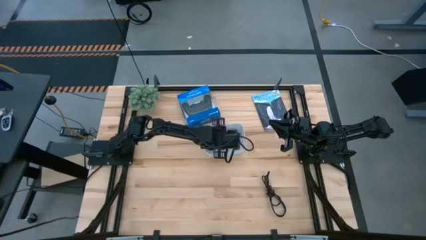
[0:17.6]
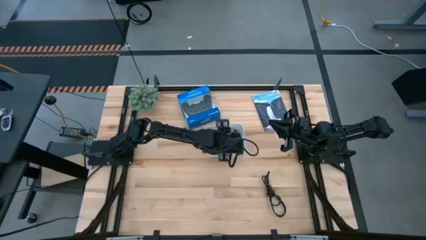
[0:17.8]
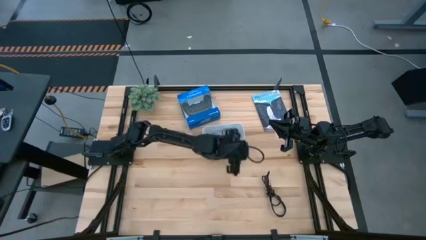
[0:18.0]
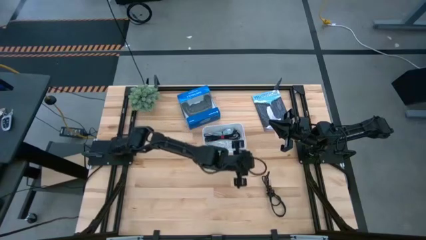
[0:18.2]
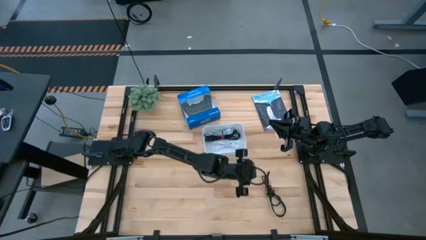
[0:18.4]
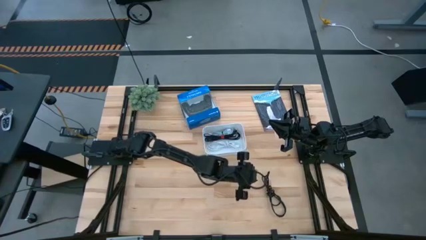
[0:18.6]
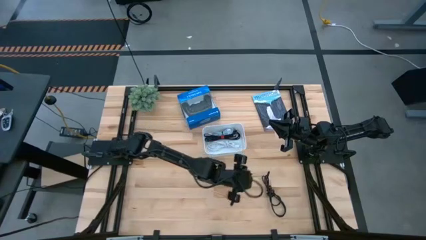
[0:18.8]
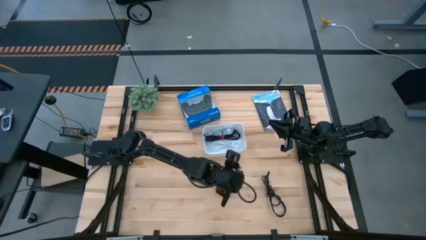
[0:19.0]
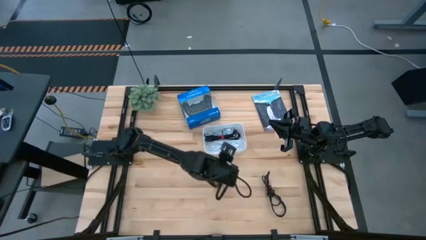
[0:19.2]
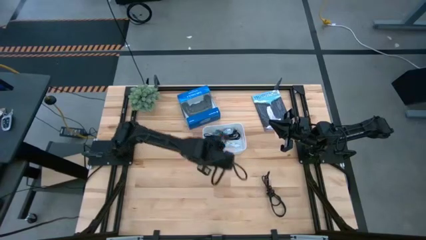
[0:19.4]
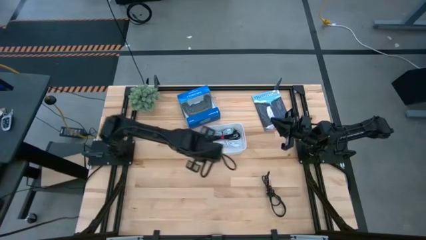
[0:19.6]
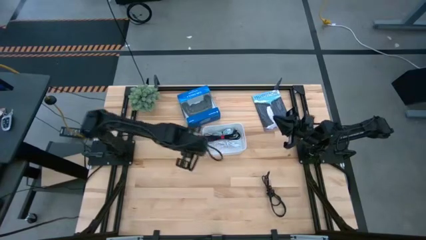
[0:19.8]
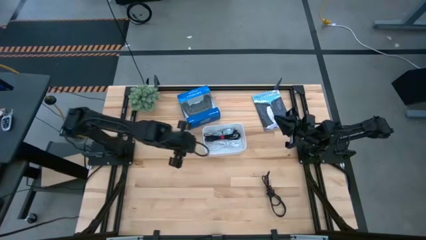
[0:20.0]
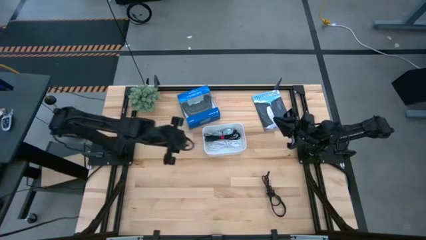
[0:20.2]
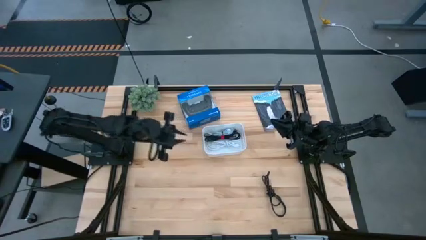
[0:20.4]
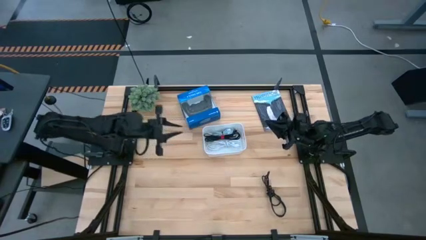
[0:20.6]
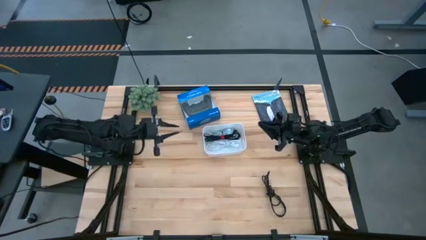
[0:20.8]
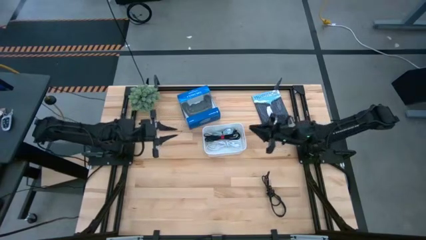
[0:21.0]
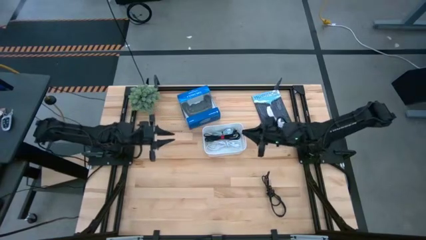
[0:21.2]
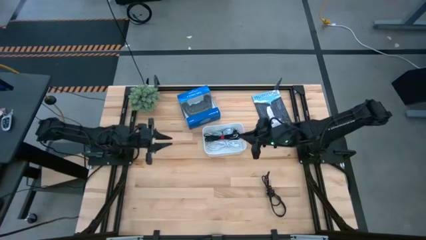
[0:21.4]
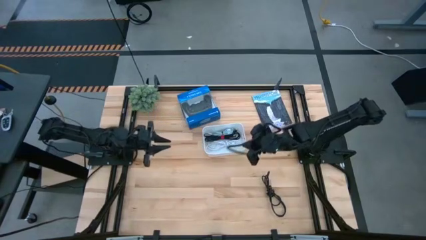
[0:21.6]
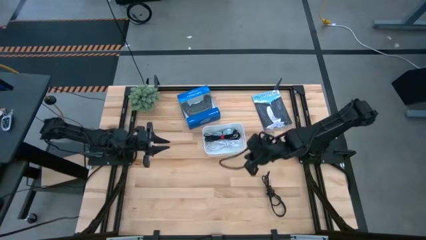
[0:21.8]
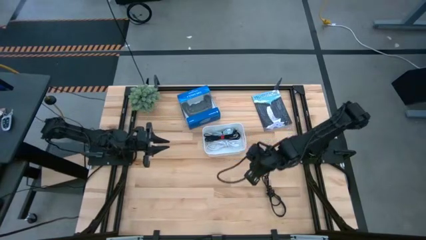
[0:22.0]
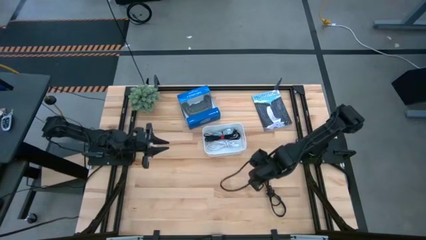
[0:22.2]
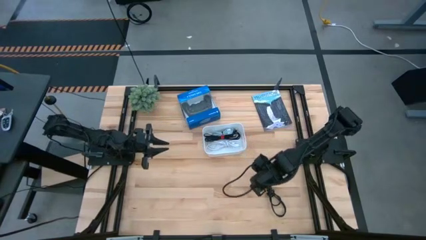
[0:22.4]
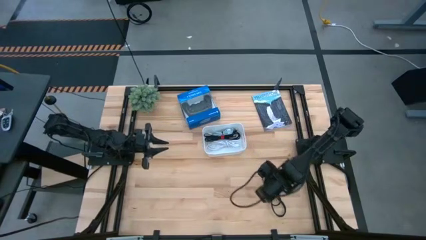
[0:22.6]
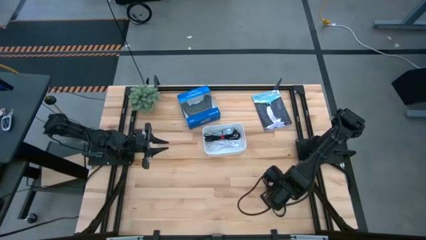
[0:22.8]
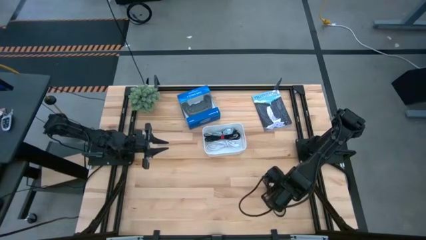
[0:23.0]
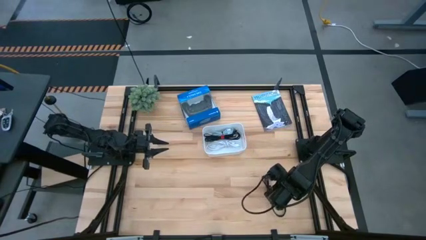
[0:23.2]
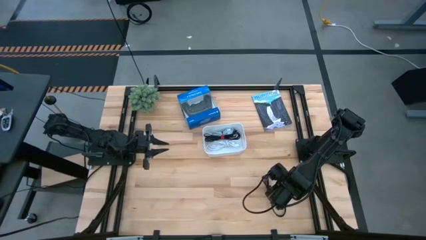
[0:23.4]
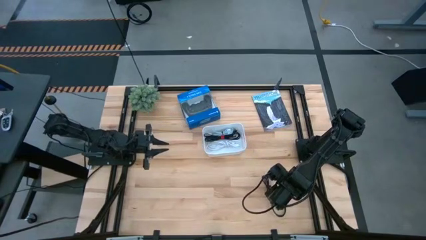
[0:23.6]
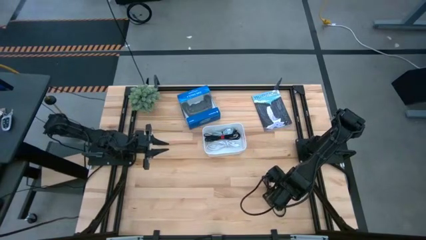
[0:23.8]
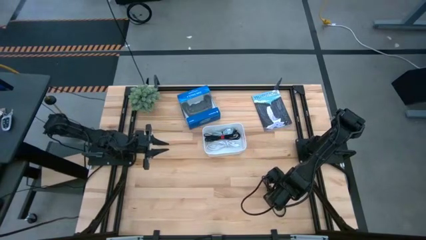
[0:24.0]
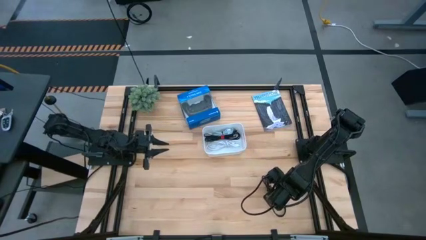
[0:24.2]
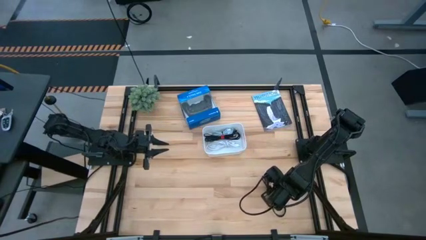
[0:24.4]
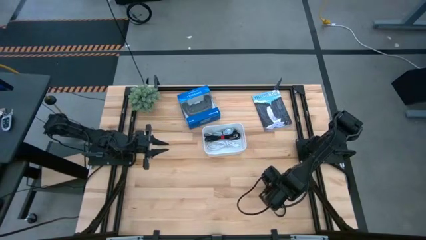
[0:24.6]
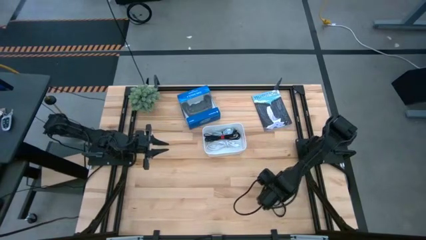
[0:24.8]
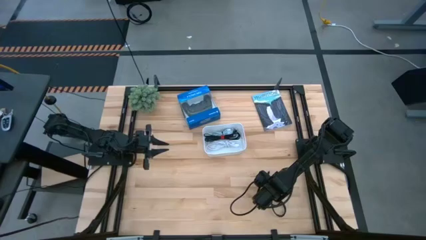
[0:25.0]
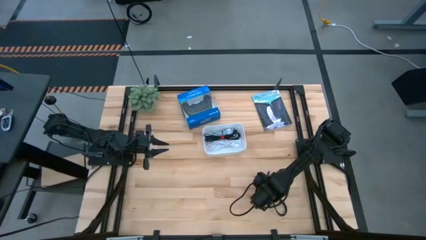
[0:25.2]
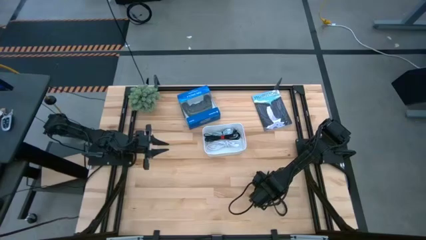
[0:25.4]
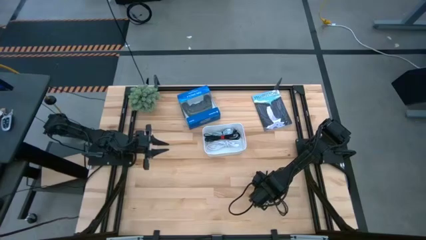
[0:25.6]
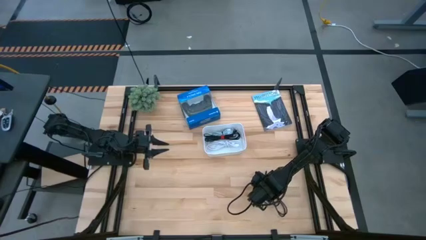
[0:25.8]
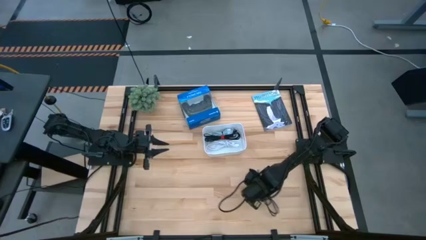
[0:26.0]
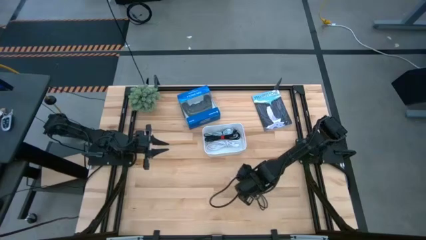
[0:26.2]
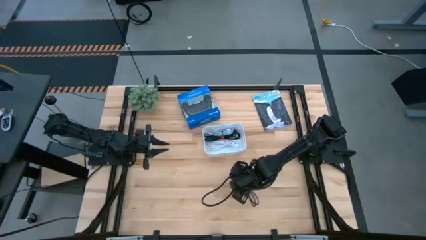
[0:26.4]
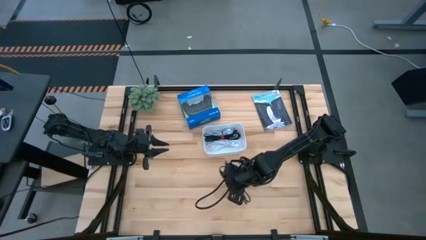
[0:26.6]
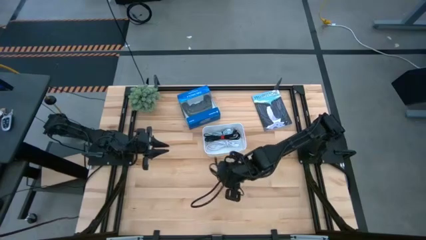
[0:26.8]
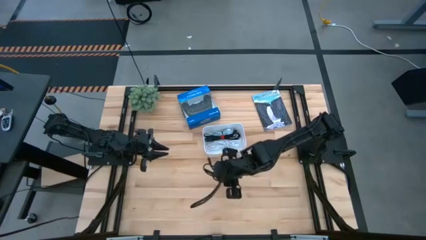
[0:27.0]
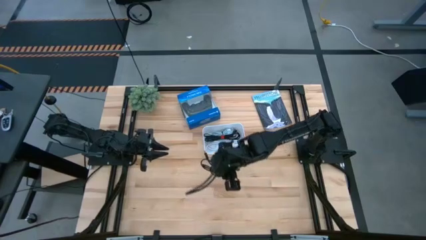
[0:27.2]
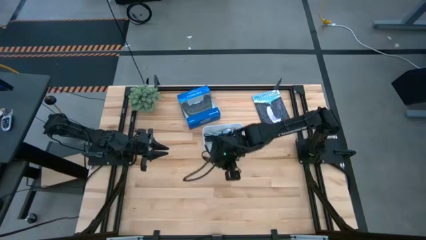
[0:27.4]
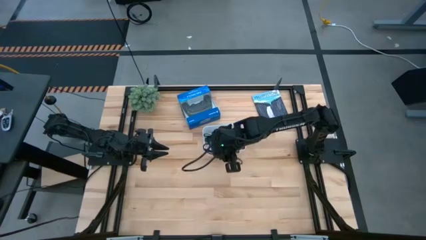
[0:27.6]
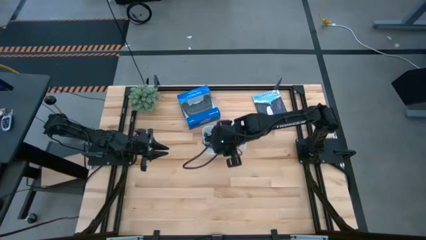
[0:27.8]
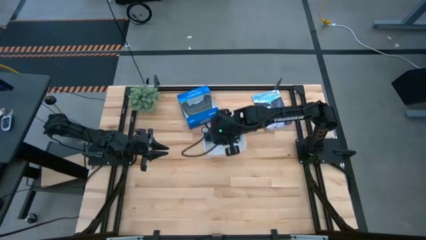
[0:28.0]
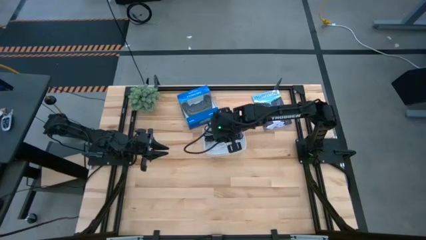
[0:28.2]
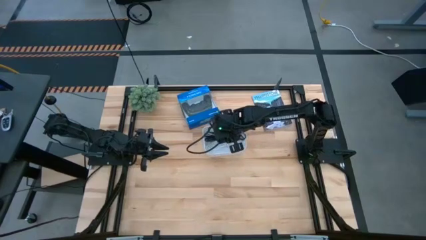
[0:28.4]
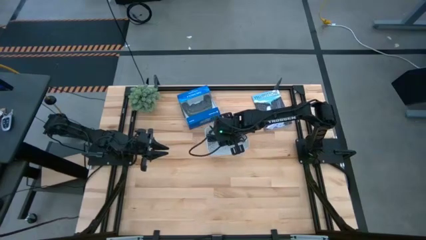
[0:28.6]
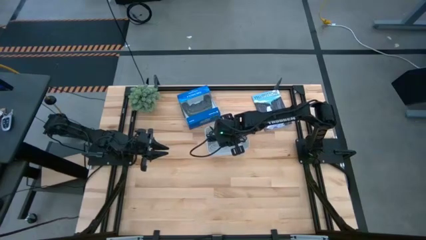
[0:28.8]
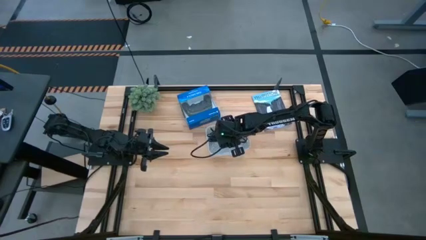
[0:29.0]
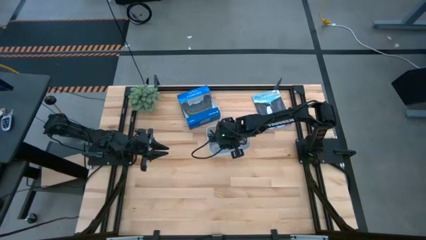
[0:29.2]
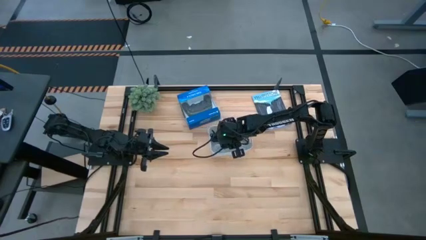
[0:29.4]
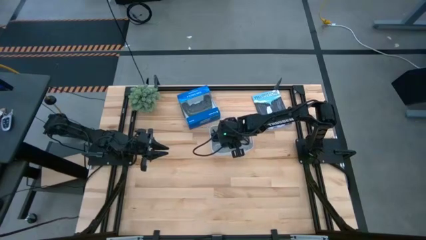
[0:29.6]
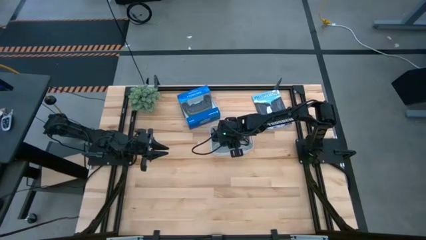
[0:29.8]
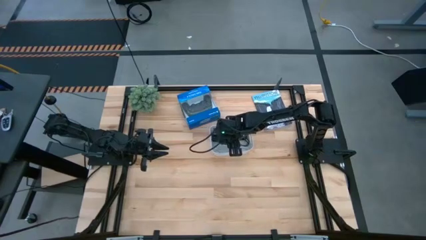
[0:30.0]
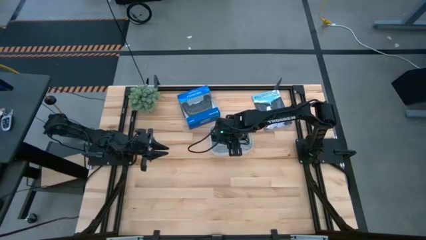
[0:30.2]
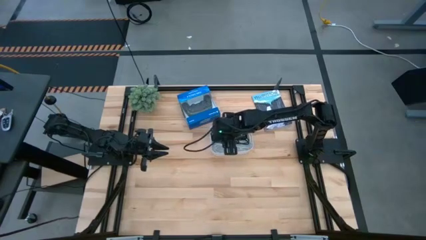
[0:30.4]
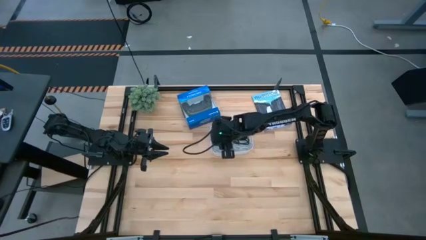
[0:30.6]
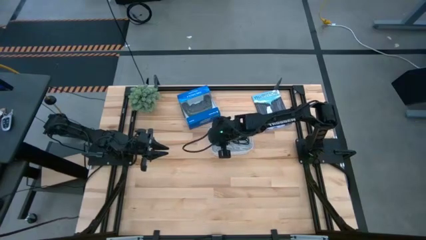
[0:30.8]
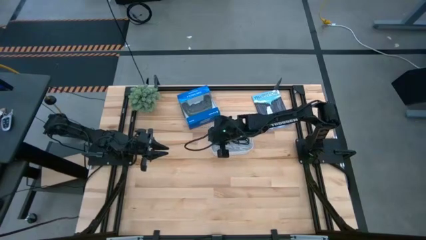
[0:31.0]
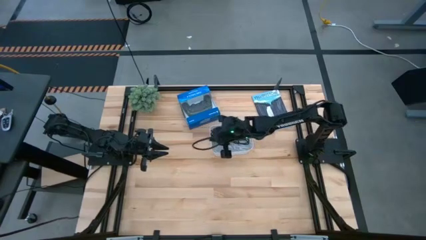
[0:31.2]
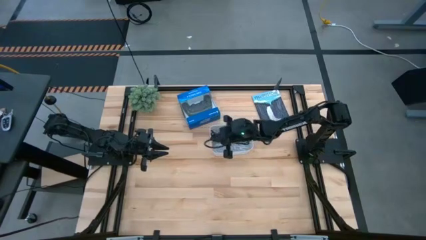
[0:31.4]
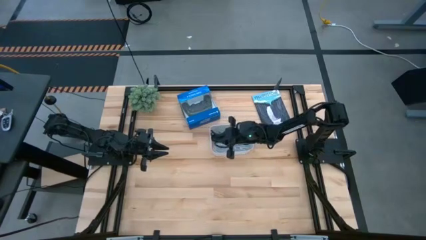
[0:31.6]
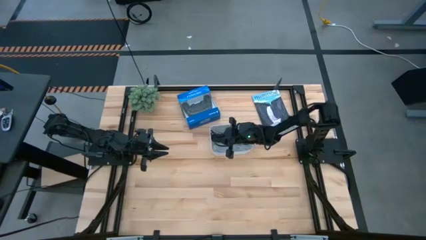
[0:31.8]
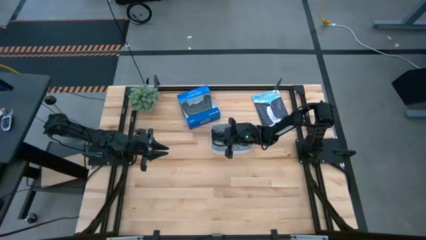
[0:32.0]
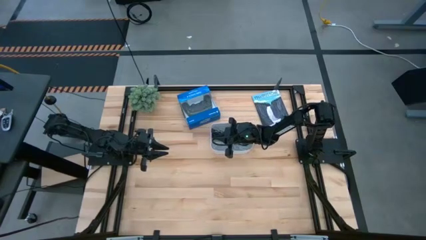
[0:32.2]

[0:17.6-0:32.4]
Task: Pick and place USB-C Cables
Put the black charger cable into the white bin
